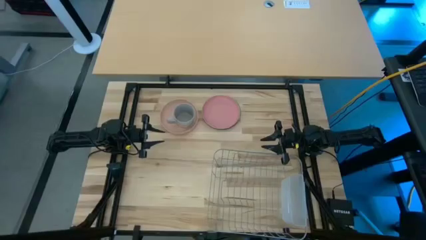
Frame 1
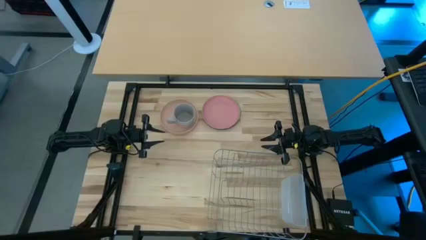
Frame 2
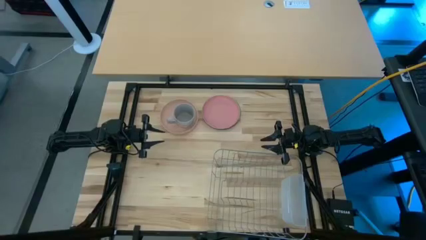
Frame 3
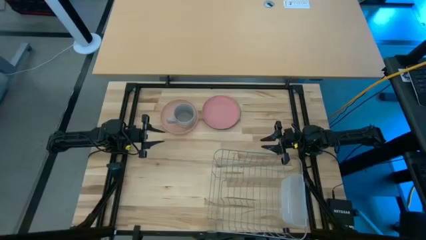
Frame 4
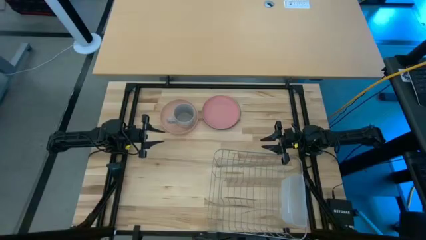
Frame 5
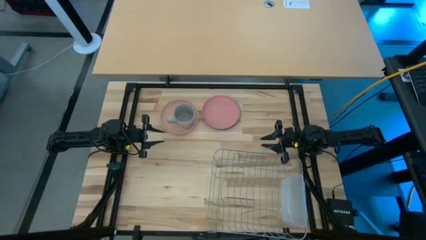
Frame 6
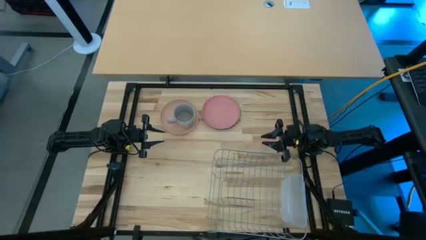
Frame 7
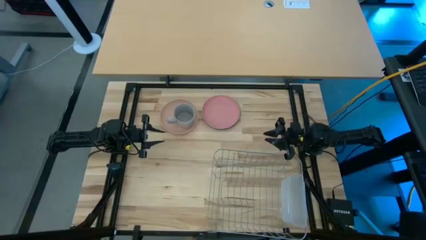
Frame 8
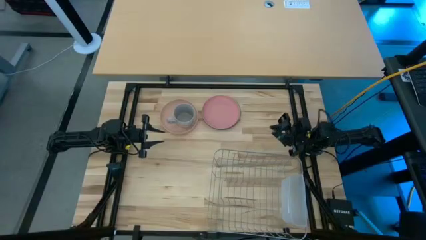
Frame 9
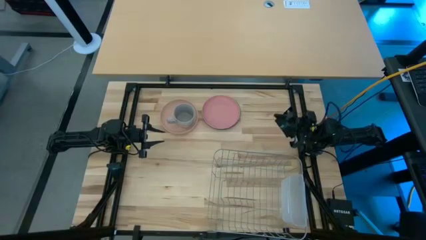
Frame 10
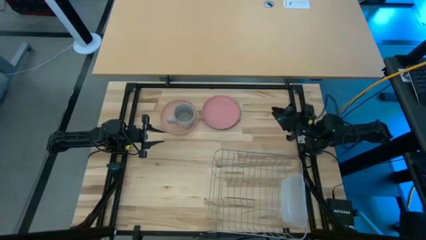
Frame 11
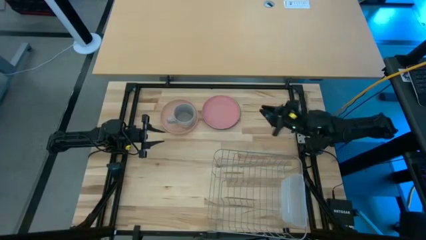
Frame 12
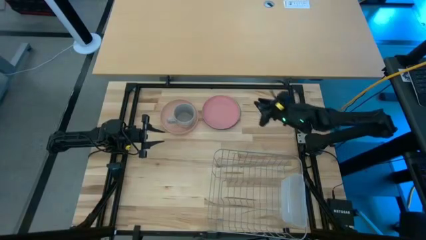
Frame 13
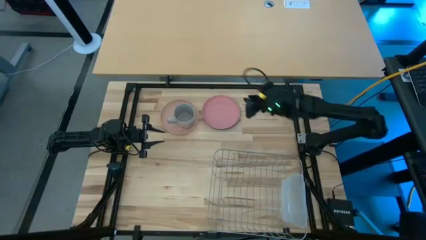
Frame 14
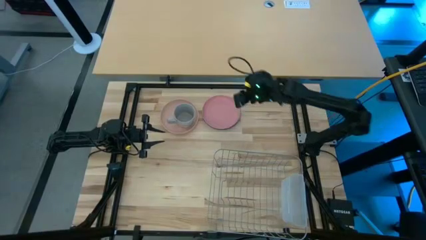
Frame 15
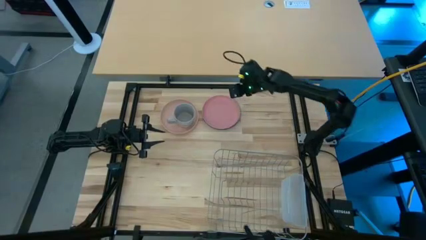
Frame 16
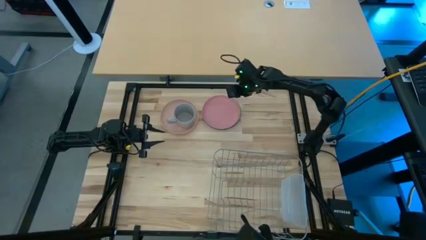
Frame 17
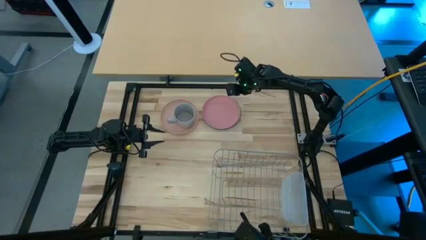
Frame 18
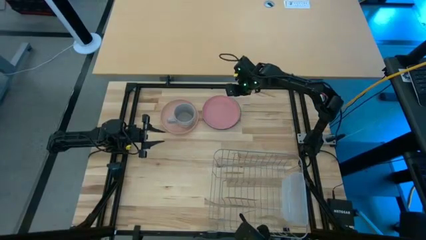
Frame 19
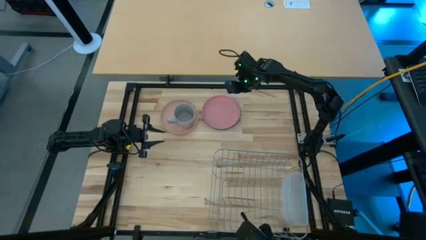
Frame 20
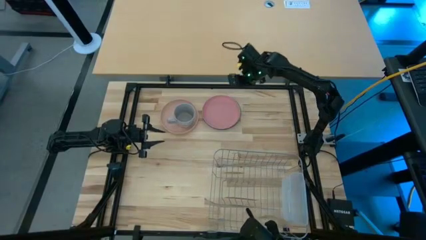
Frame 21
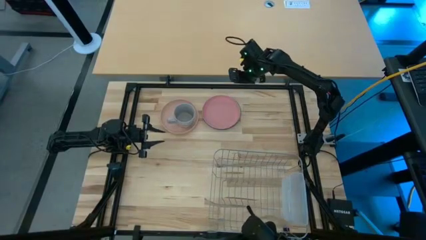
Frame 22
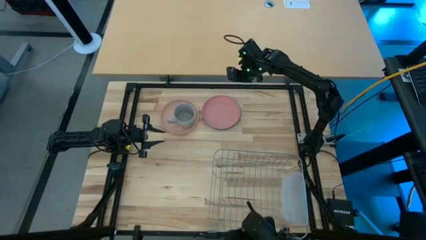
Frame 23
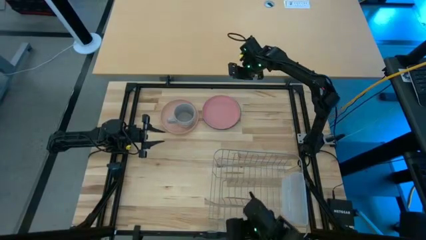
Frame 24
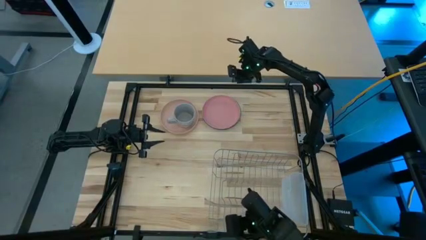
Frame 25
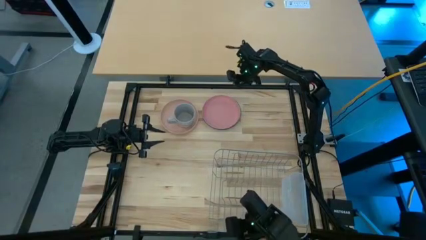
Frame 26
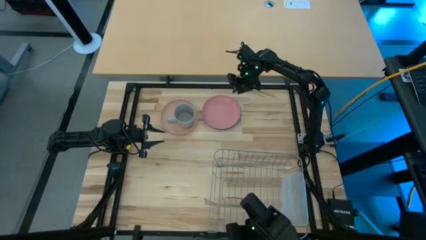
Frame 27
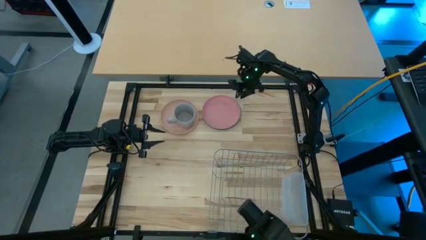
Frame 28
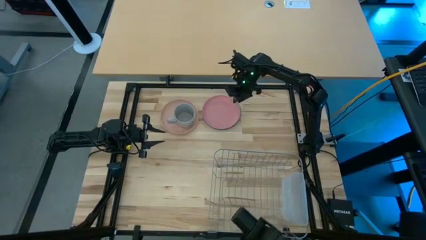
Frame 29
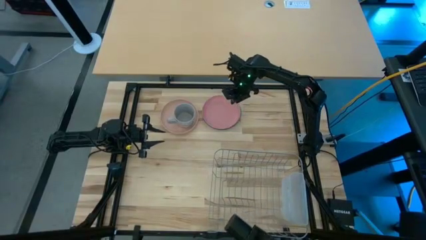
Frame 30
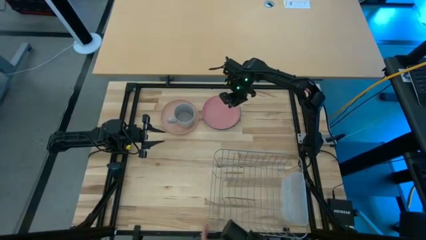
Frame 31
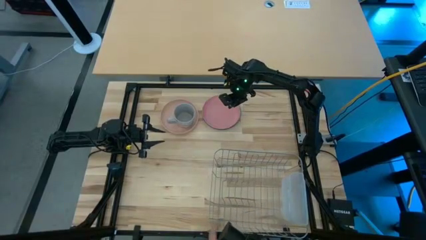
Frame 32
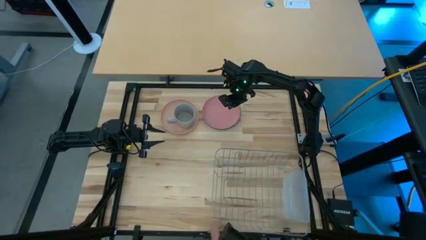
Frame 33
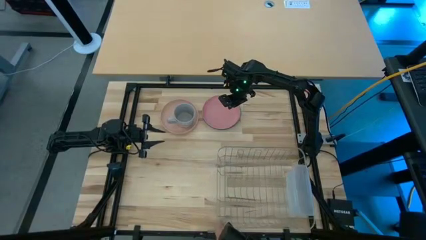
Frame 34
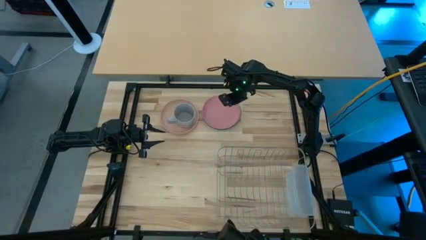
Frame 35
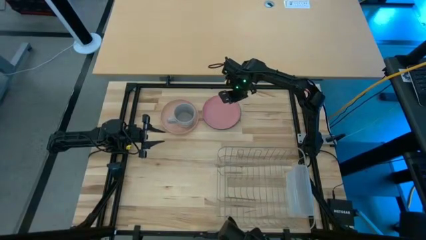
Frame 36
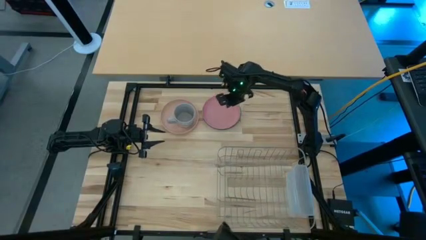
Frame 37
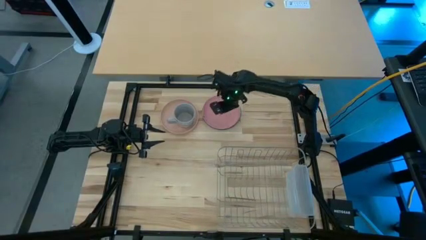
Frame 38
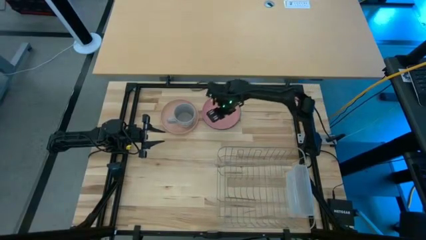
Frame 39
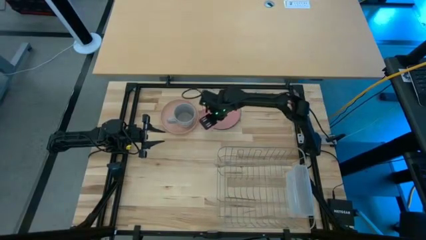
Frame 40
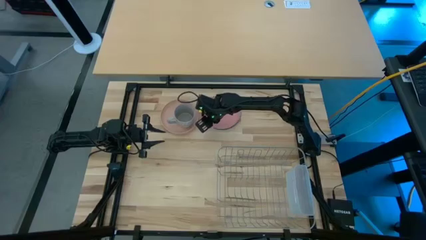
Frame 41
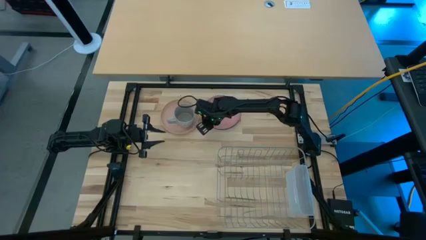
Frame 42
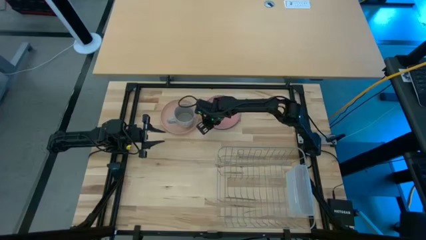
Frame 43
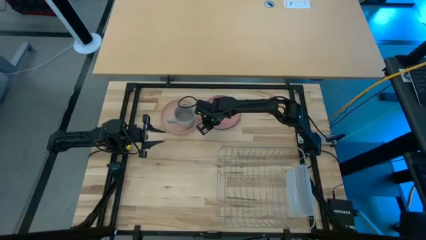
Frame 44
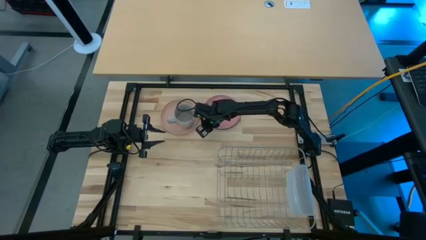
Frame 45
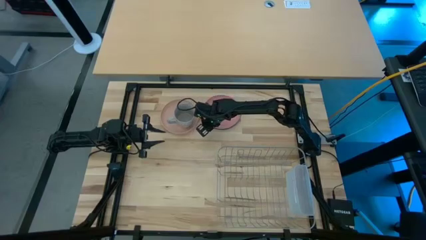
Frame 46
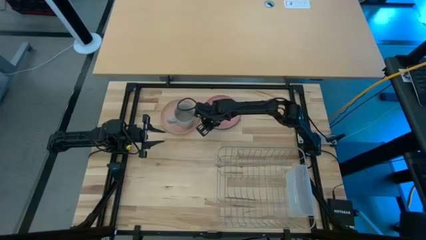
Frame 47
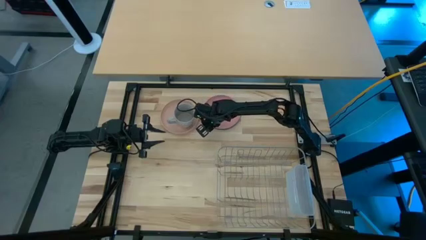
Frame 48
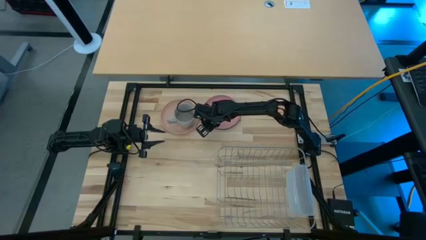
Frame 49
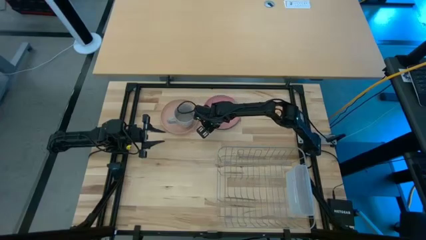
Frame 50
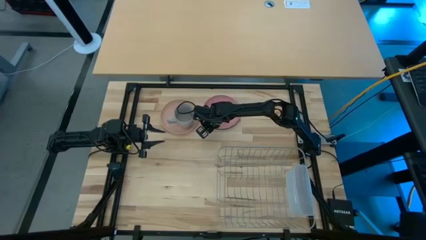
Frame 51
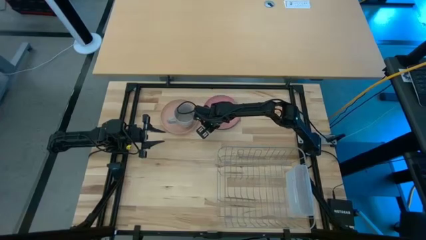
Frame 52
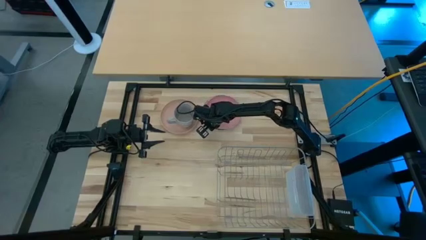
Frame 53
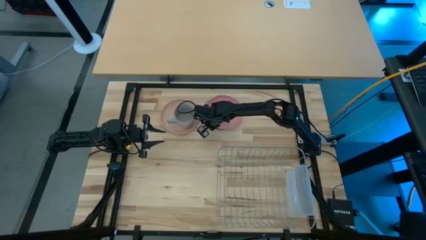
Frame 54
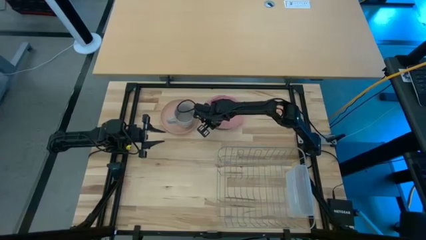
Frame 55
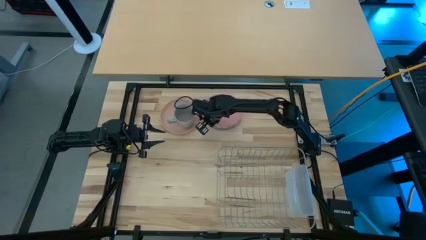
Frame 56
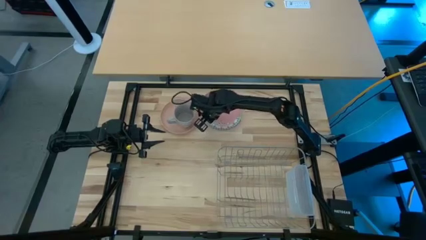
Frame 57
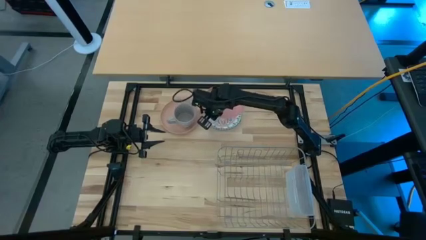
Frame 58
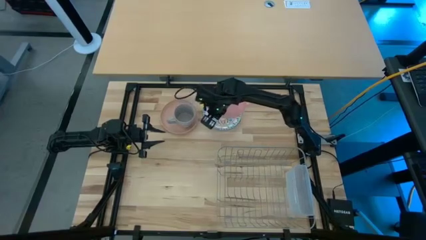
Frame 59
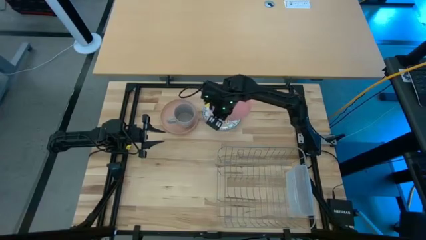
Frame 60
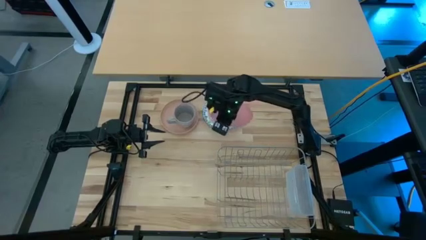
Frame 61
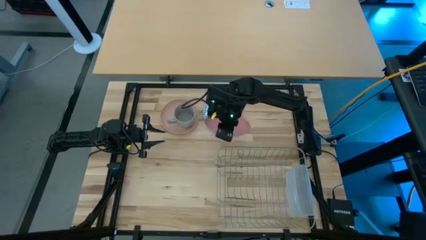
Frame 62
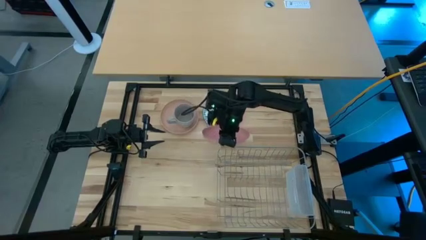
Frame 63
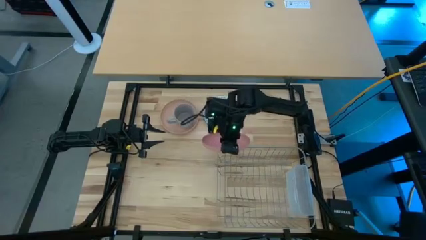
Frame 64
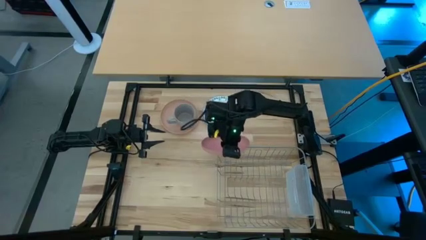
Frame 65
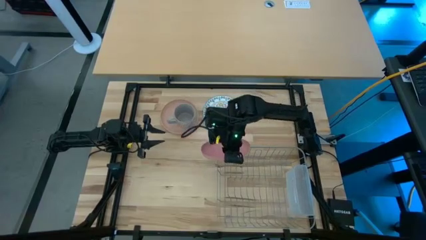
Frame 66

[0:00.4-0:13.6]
Task: Sort dishes
Put the pink plate into the dish rack
